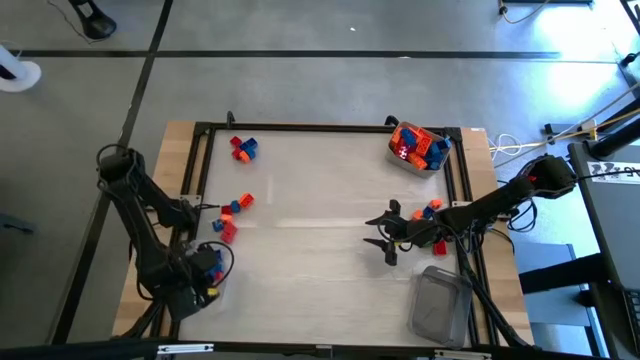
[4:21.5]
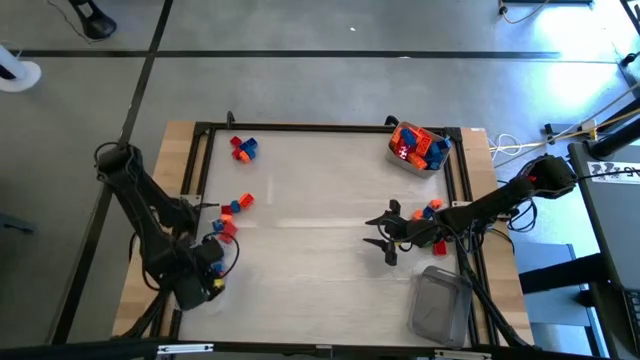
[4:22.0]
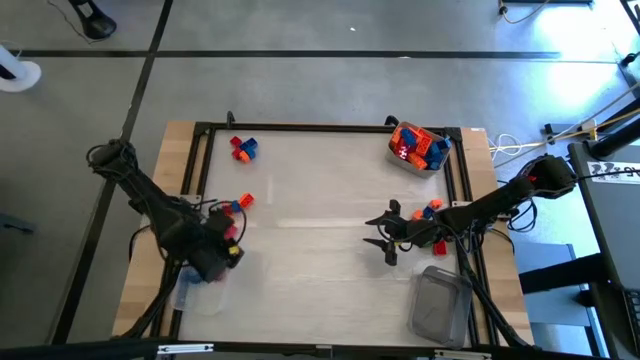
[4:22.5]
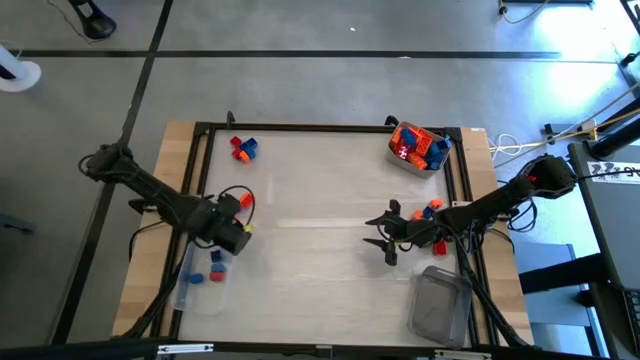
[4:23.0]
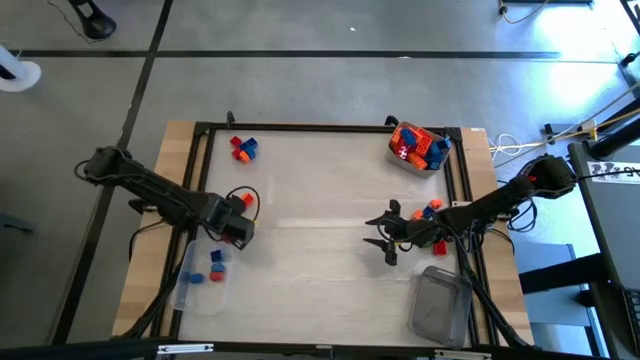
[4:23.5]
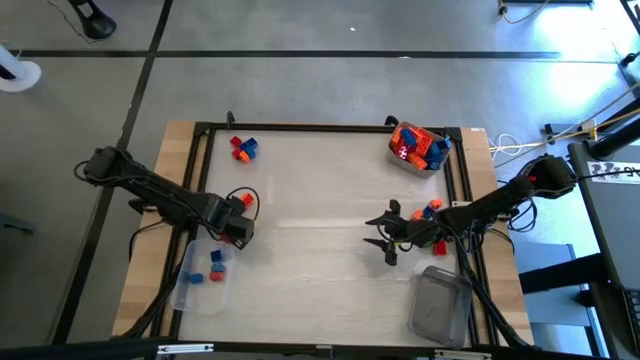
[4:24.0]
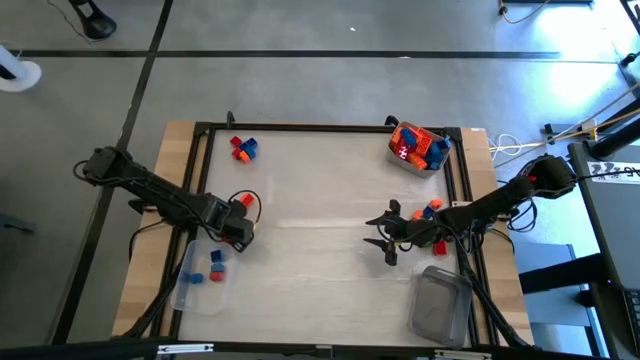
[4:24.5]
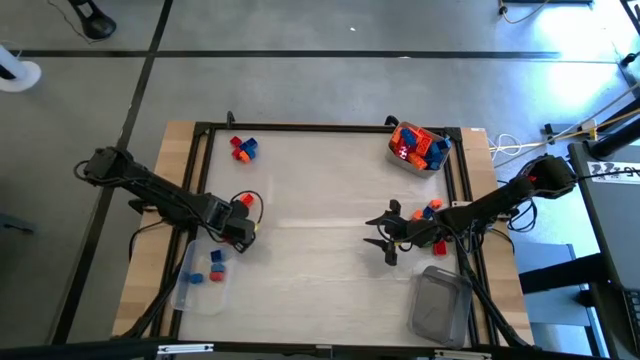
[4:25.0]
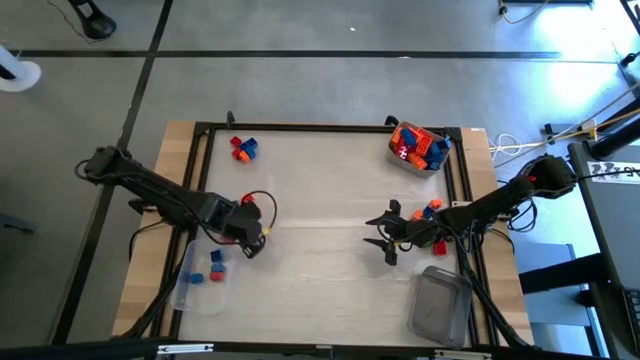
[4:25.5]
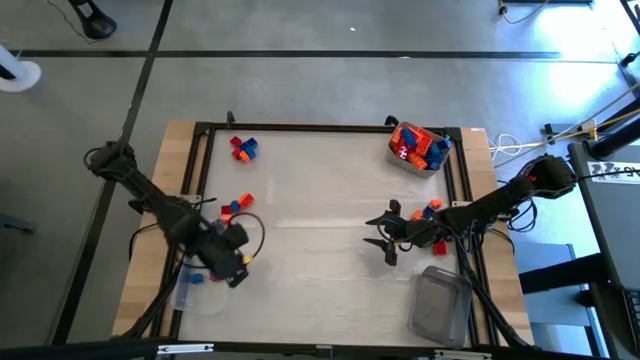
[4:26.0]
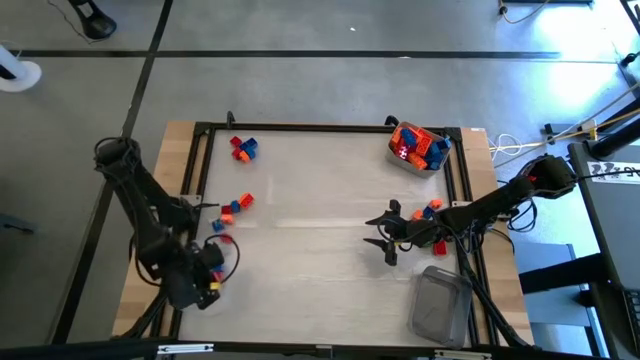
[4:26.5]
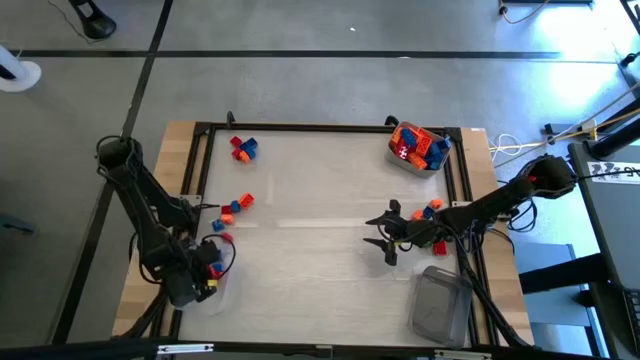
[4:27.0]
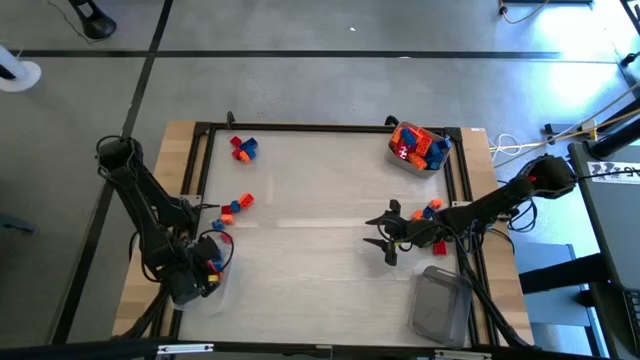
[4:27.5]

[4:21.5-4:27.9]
Task: Sort blocks by size
Put the red block into the transparent bin

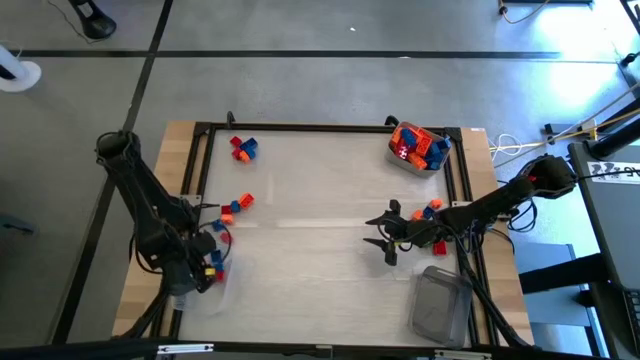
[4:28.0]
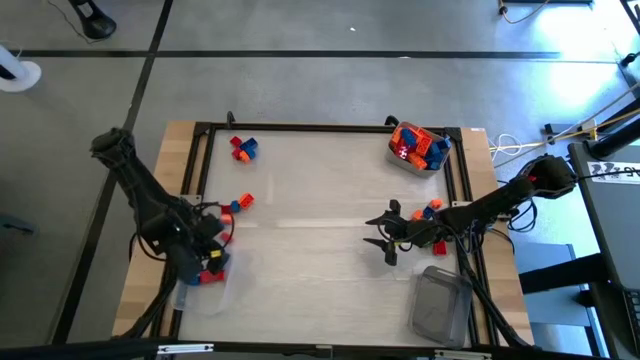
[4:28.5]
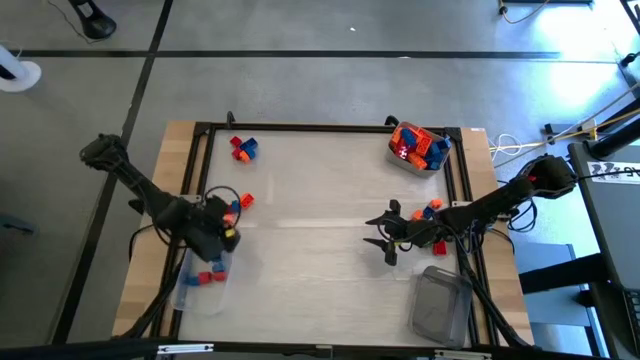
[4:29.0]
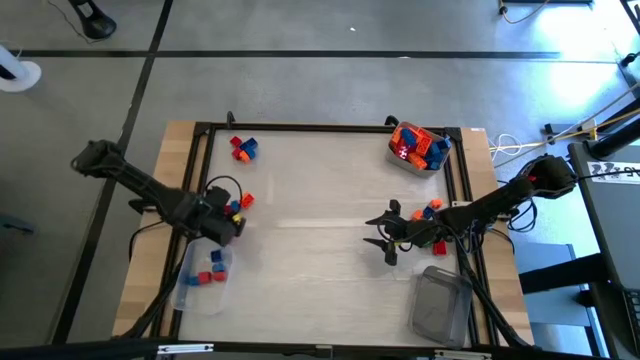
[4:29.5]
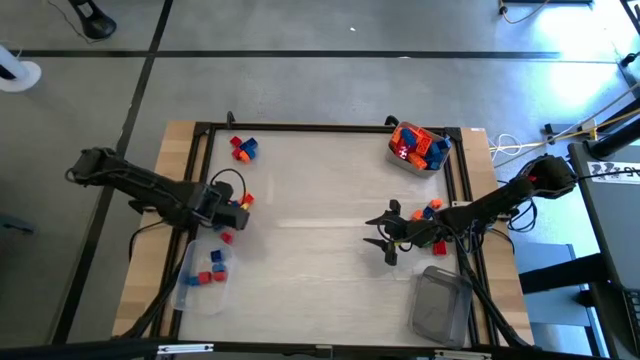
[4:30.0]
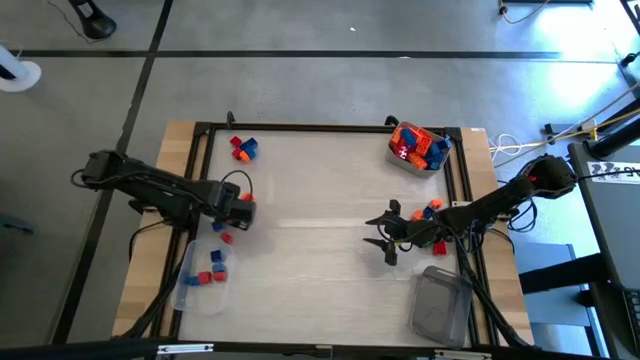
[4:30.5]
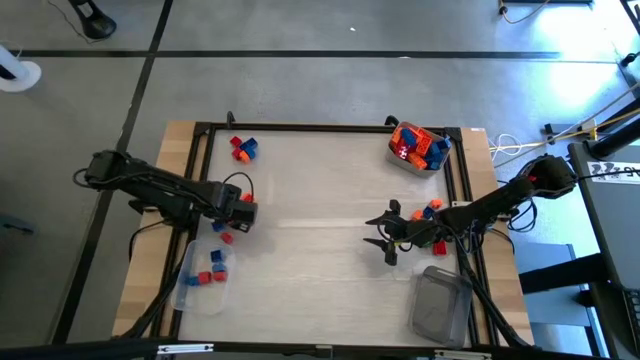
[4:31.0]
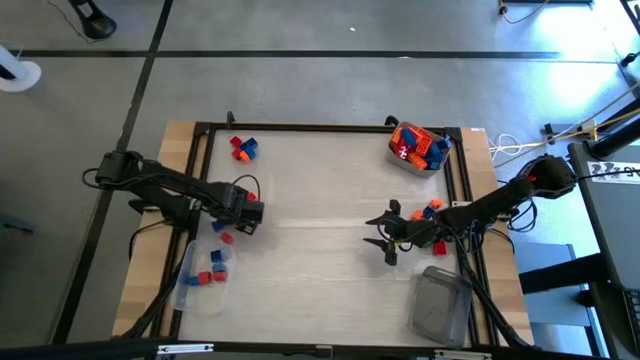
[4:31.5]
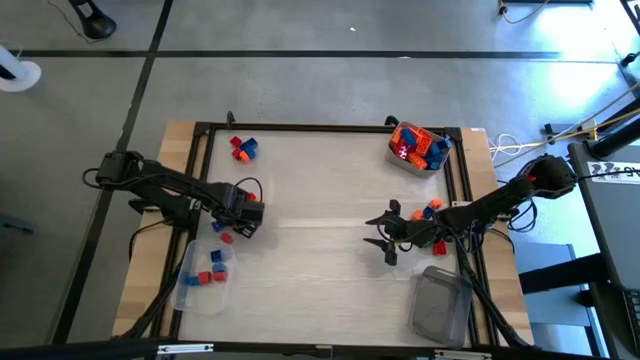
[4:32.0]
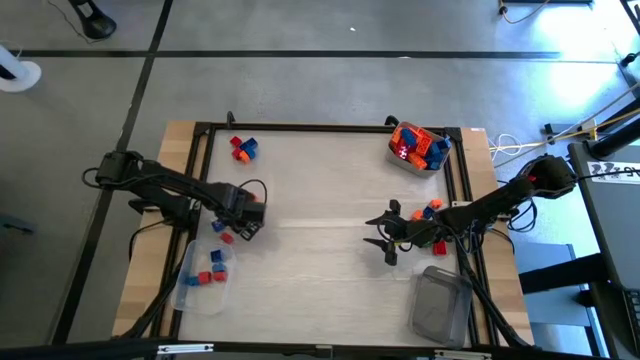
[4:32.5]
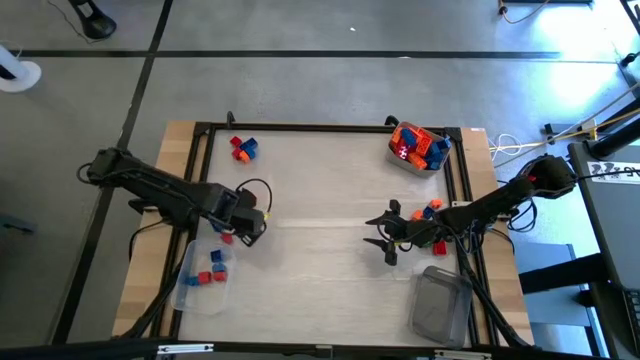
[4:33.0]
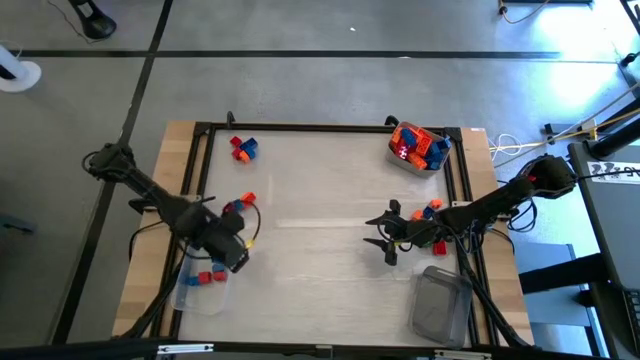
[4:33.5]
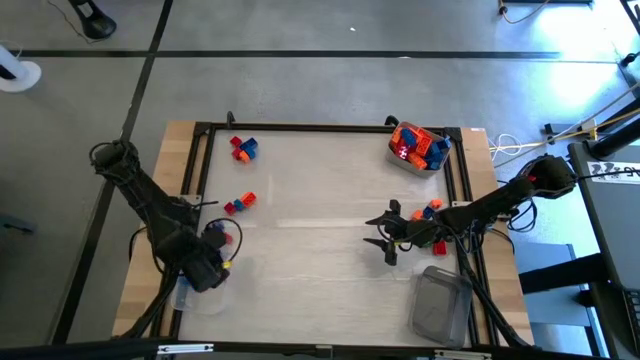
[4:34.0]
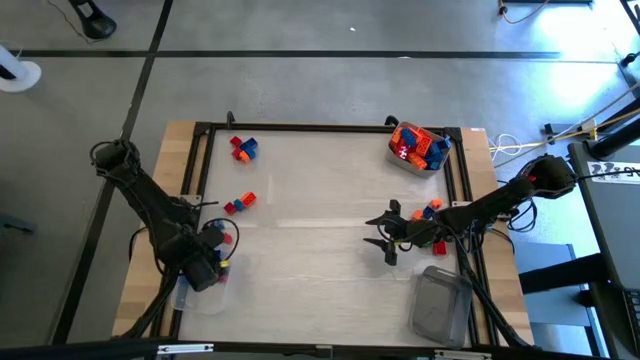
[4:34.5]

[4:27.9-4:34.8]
Put the orange game piece into the transparent bin

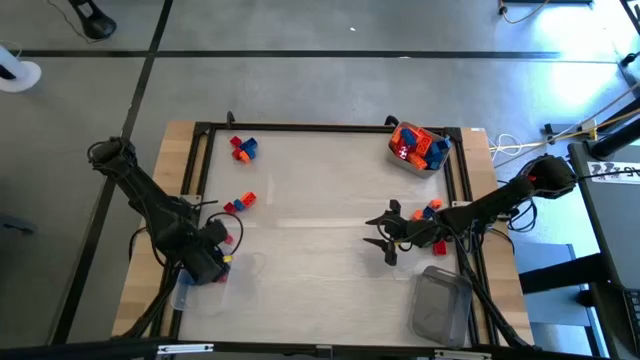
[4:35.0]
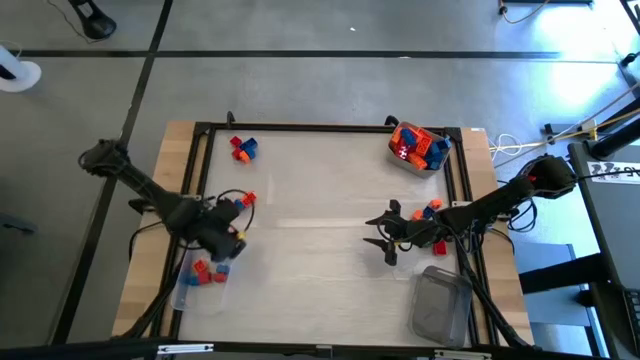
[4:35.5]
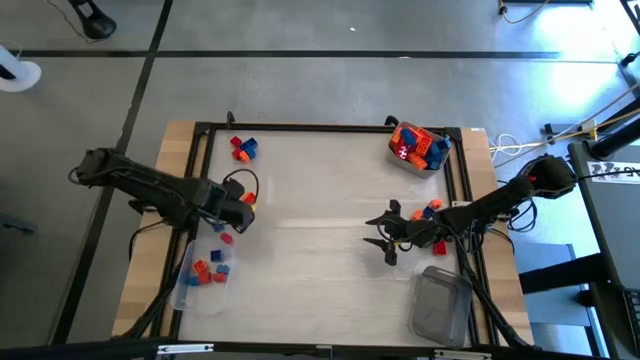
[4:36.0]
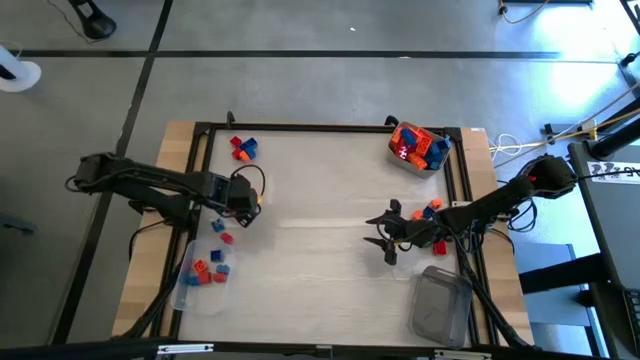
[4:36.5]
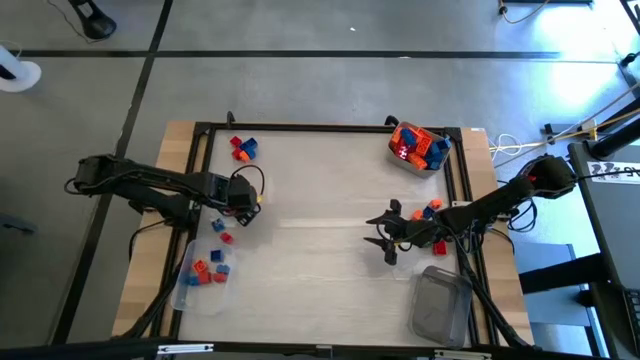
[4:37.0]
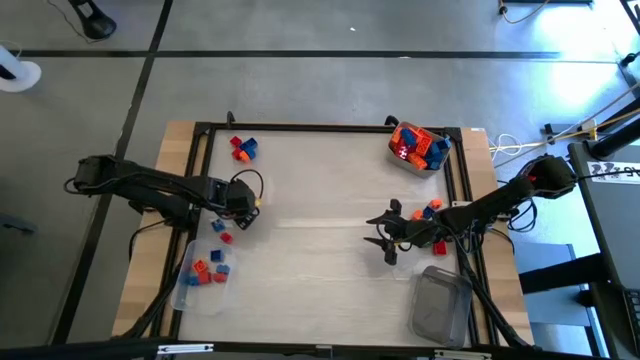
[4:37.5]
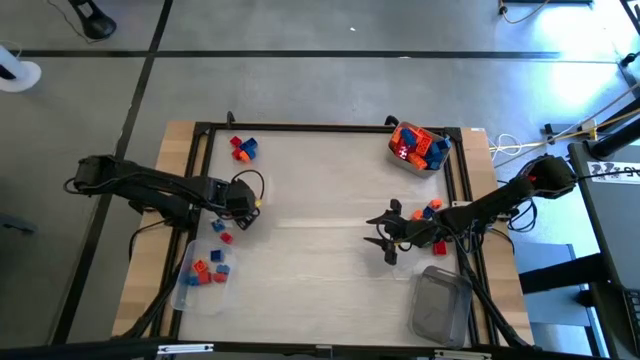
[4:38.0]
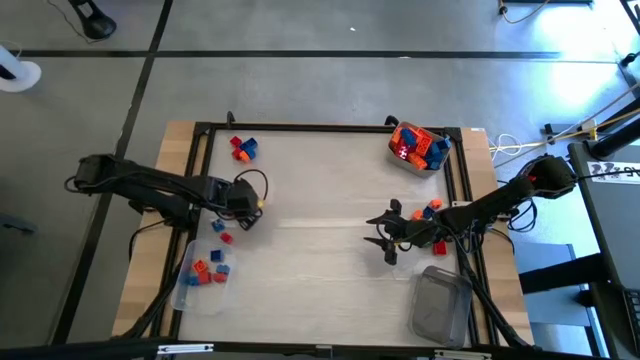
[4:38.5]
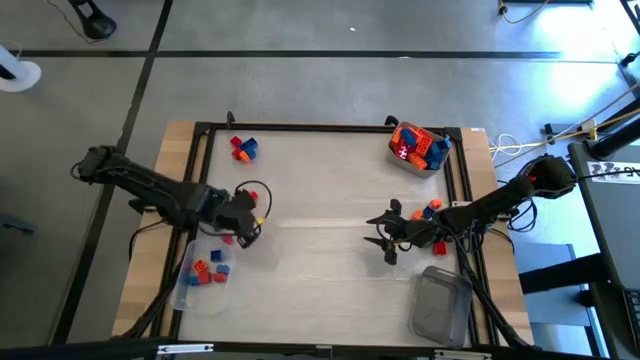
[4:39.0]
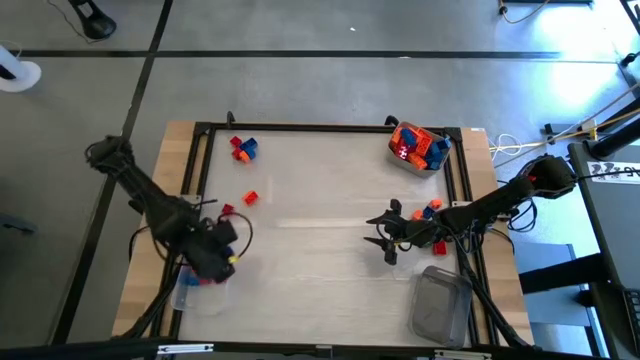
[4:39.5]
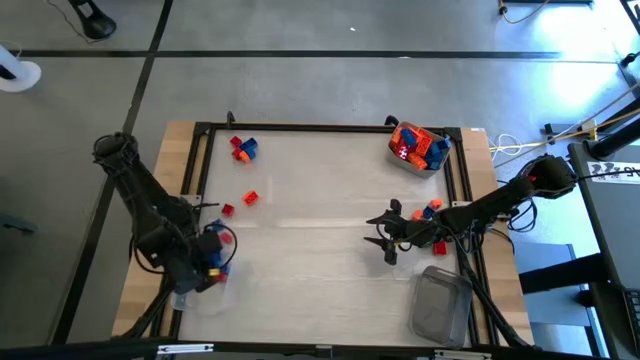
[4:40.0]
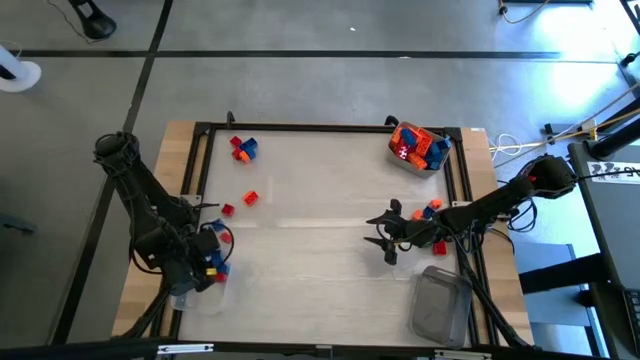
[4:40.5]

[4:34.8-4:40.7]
Put the blue game piece into the transparent bin

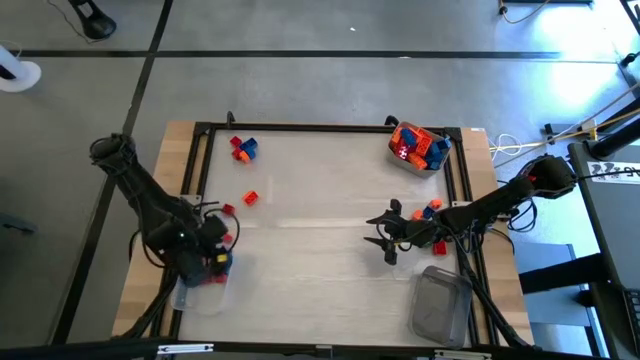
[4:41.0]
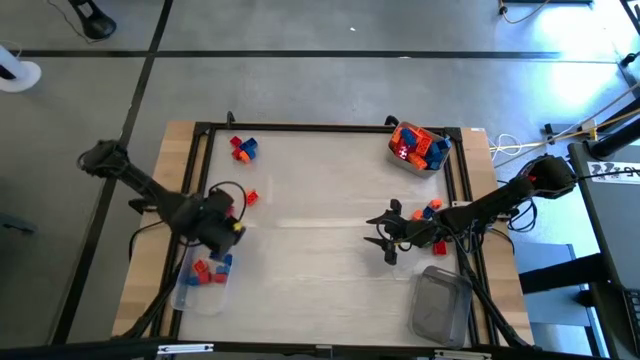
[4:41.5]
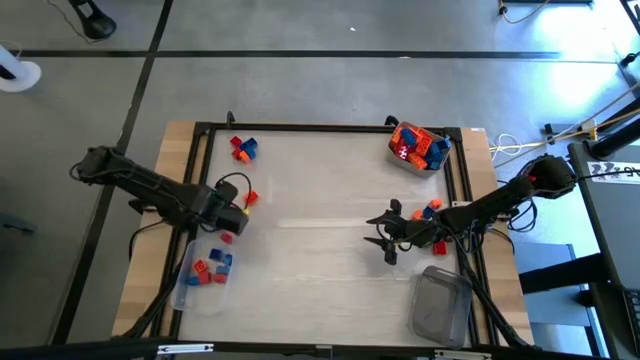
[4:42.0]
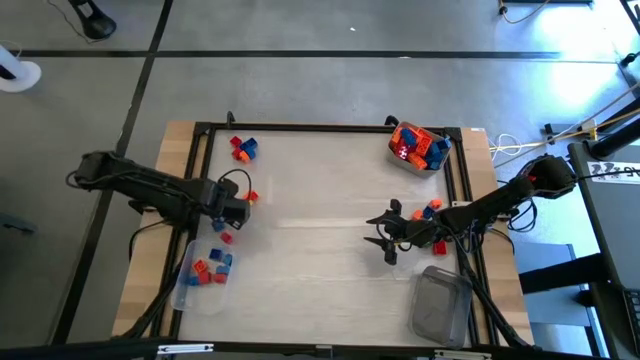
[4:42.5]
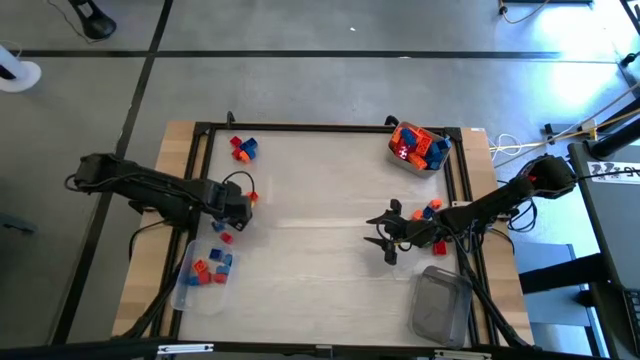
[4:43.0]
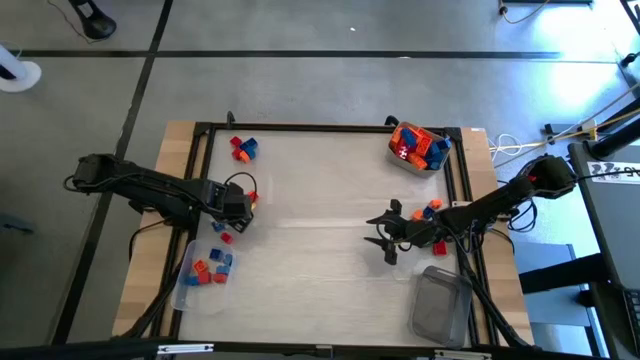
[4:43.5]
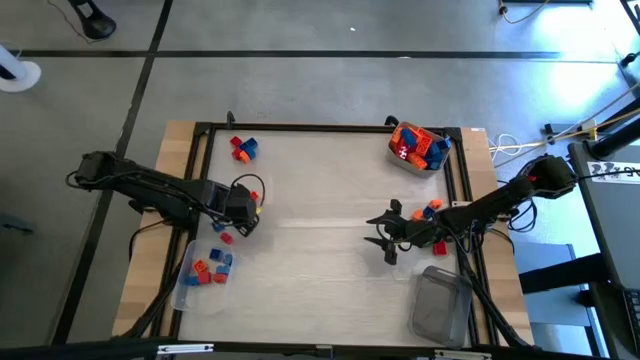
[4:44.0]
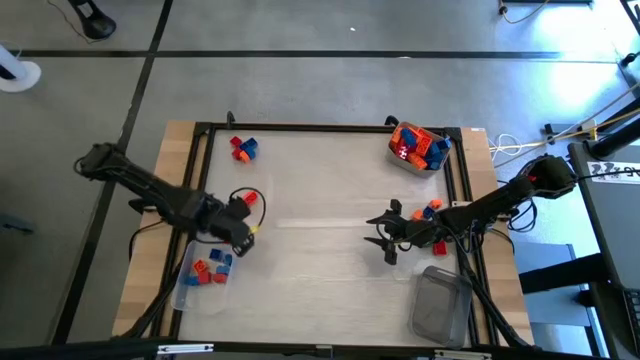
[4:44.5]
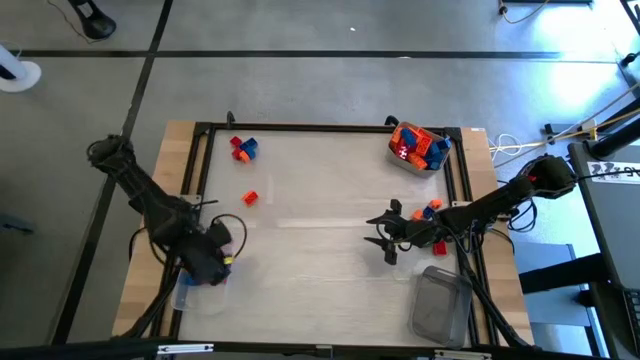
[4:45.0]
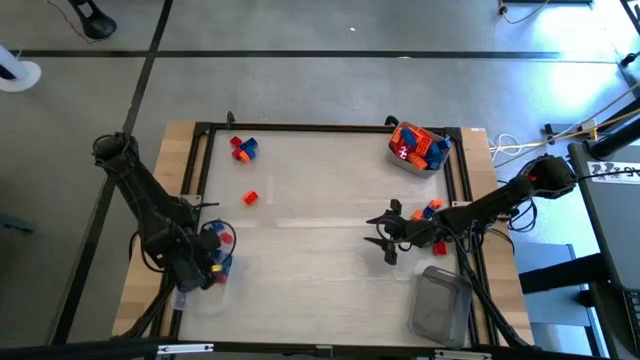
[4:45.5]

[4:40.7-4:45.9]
Put the red game piece into the transparent bin
